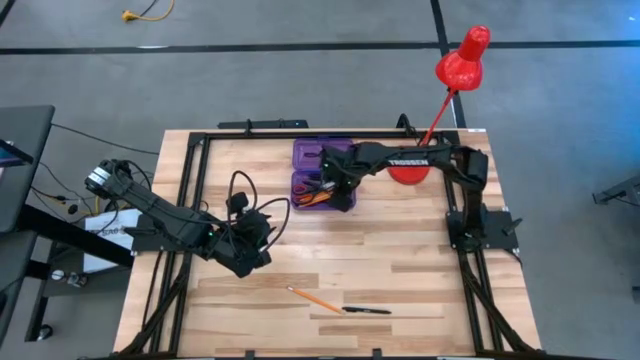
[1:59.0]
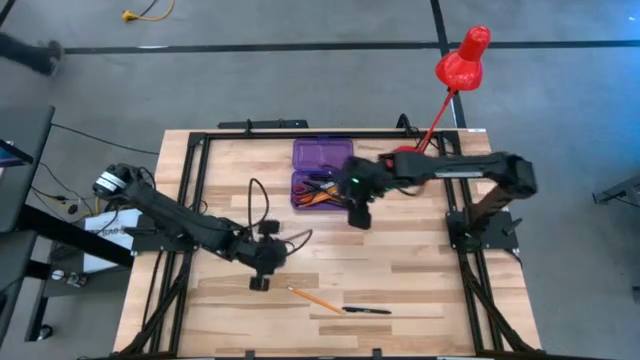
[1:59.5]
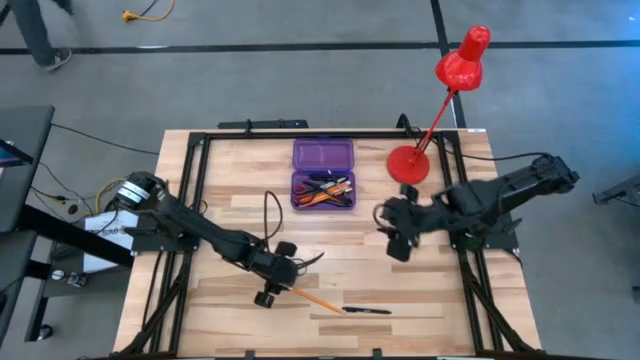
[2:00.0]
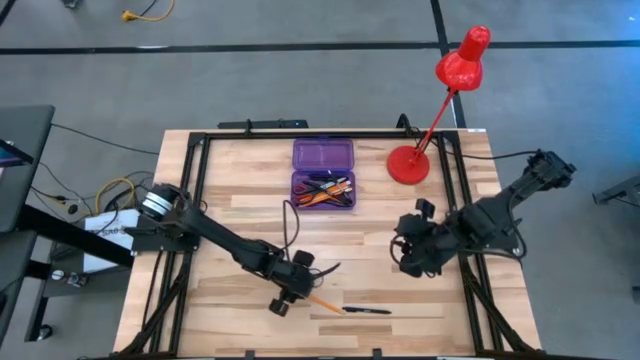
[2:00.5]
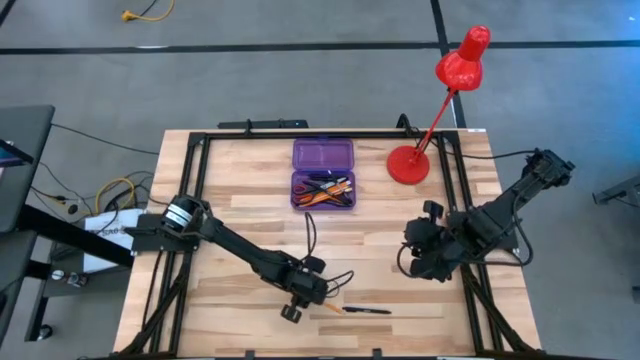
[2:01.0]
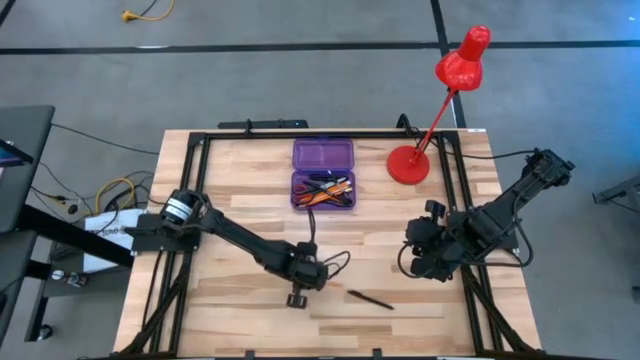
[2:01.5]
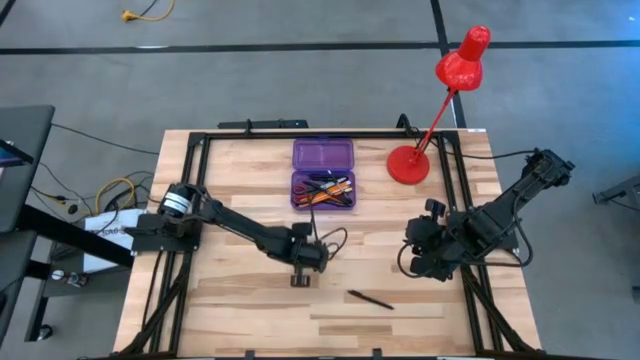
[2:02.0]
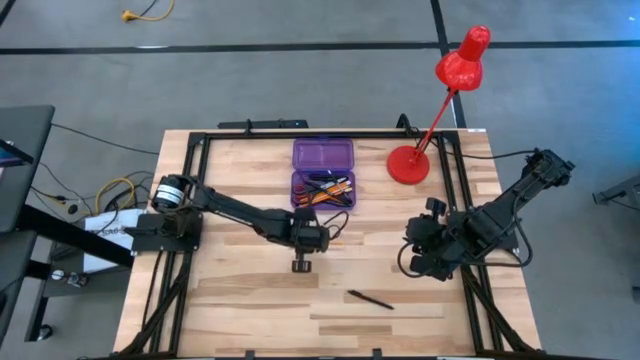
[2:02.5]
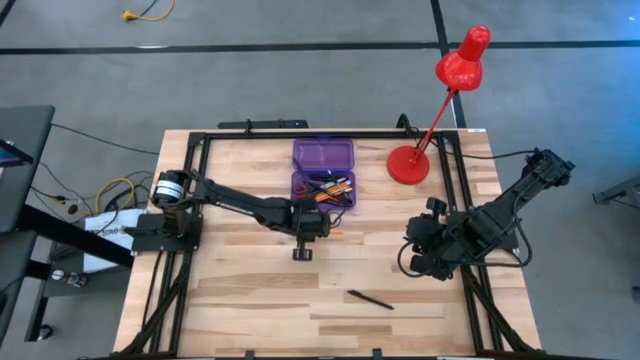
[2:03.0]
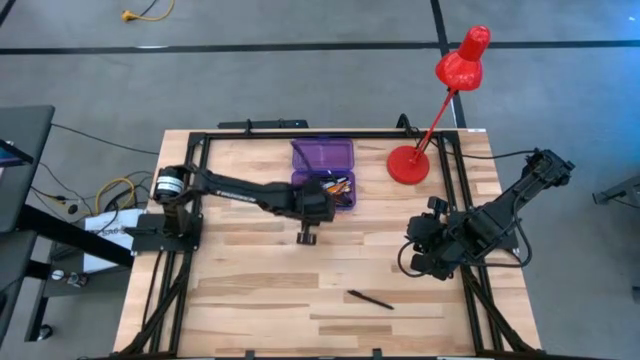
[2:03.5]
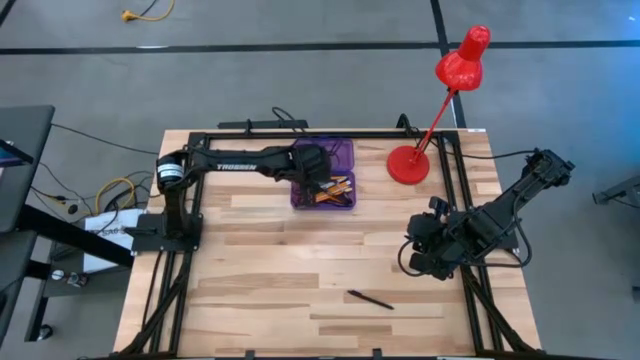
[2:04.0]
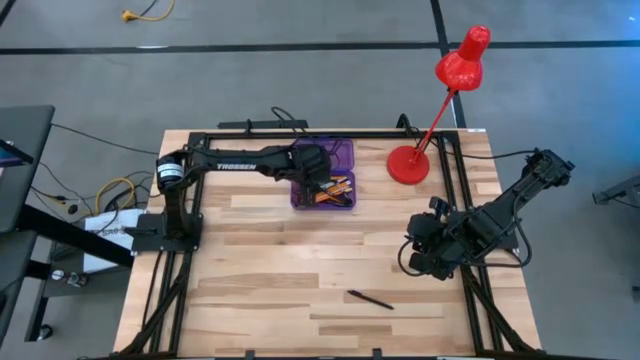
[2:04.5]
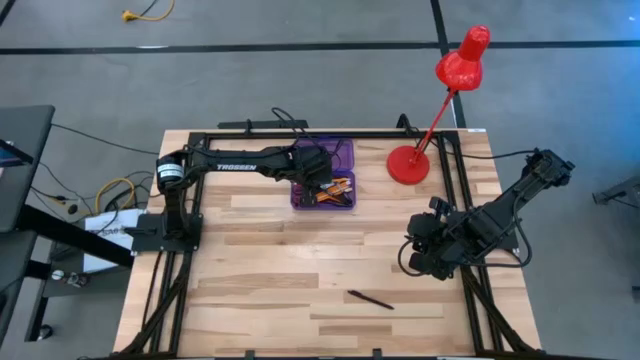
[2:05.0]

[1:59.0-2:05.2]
Task: Pick & place school supplies into a supply box
Put the yellow pencil into the purple supply box

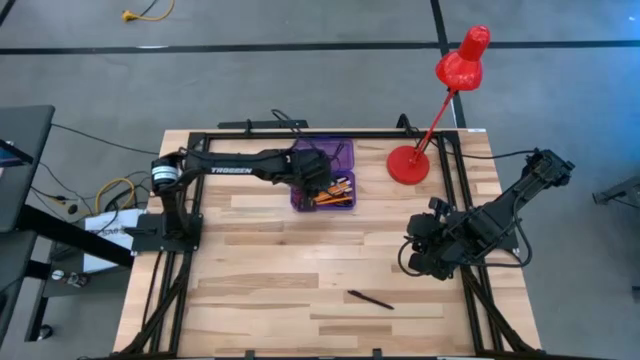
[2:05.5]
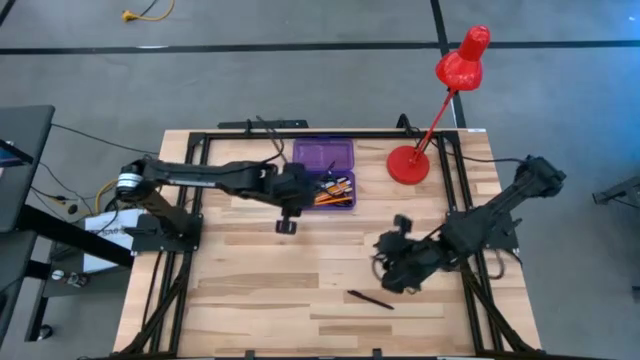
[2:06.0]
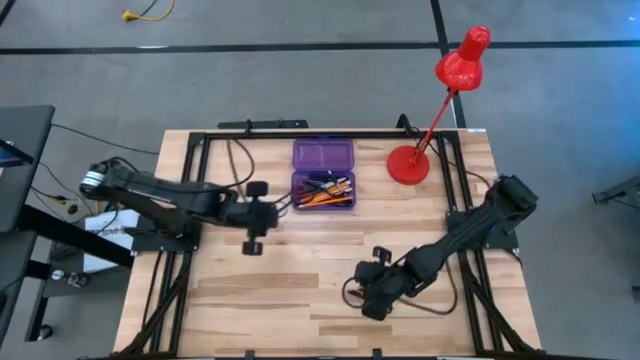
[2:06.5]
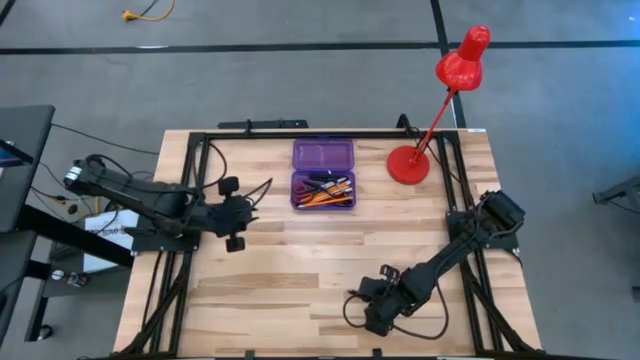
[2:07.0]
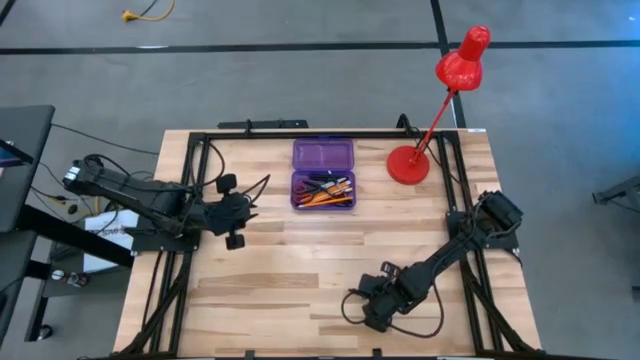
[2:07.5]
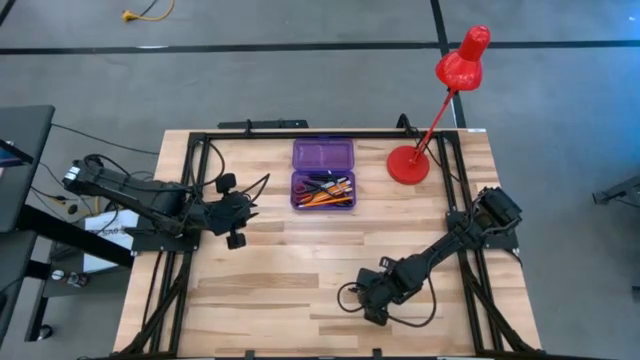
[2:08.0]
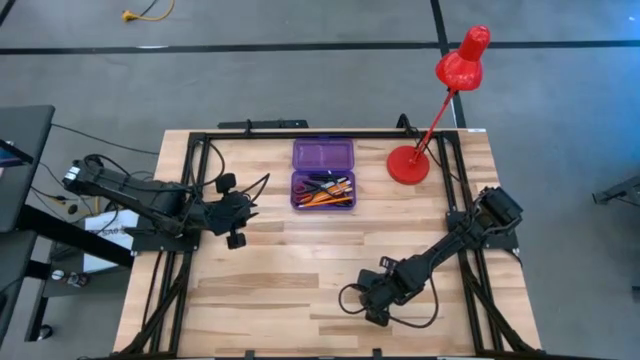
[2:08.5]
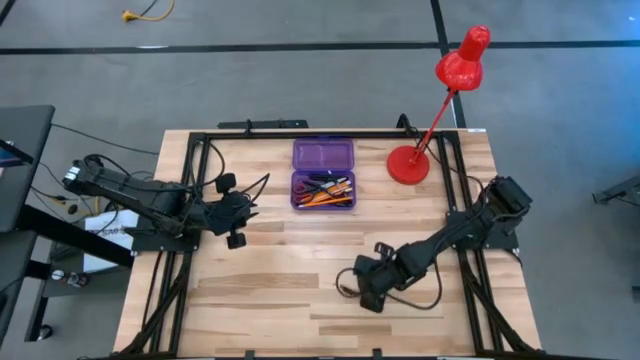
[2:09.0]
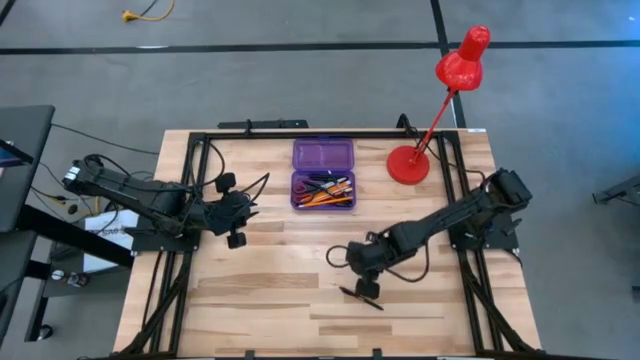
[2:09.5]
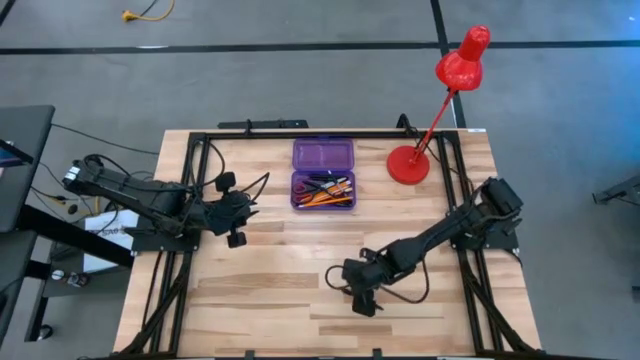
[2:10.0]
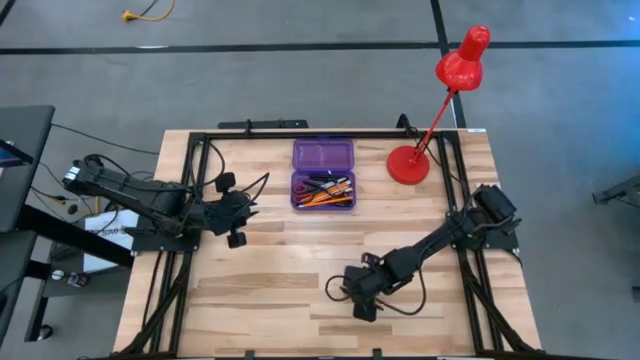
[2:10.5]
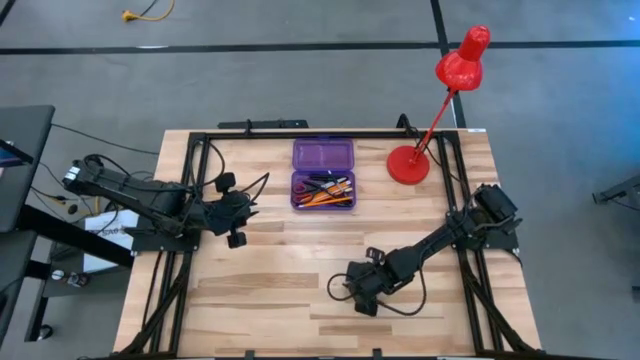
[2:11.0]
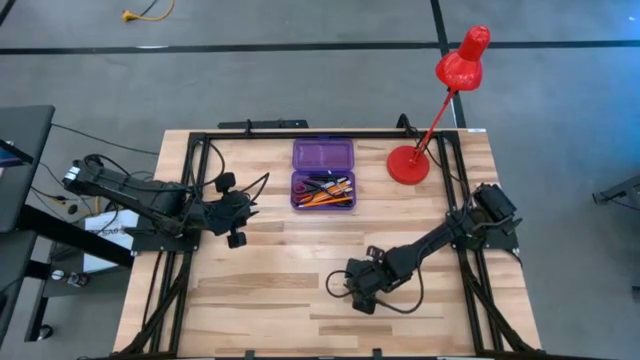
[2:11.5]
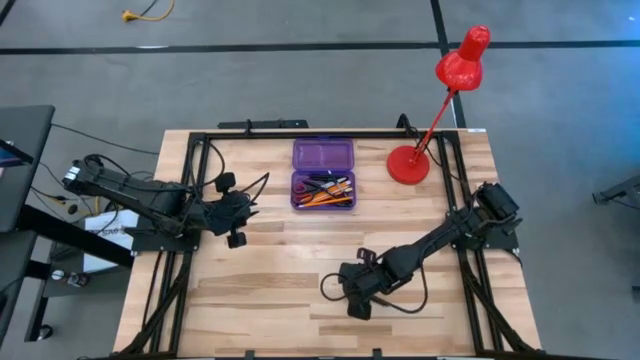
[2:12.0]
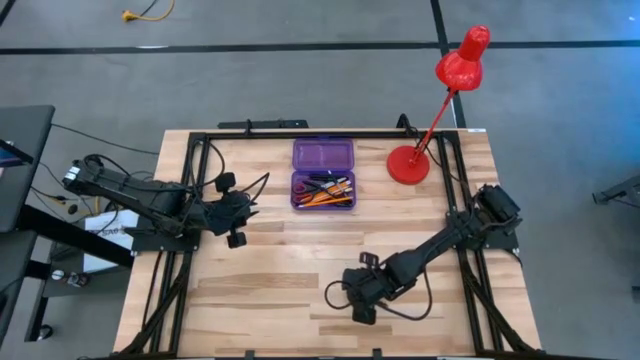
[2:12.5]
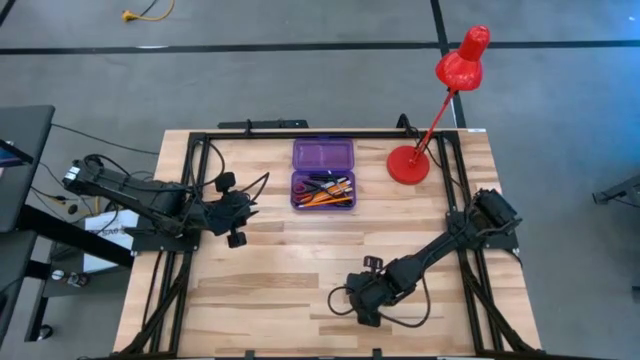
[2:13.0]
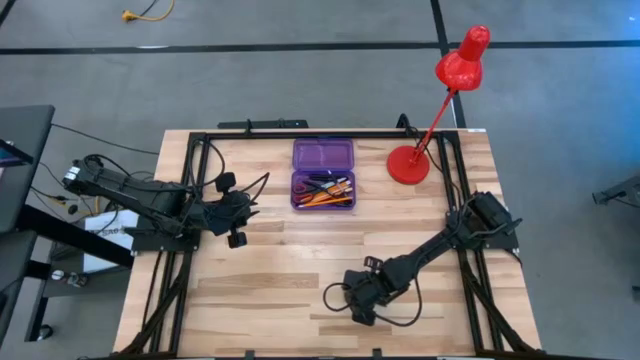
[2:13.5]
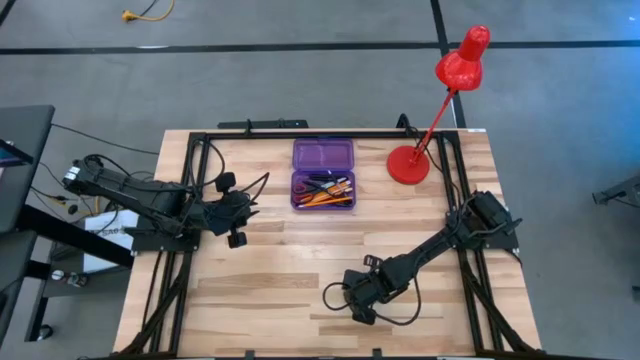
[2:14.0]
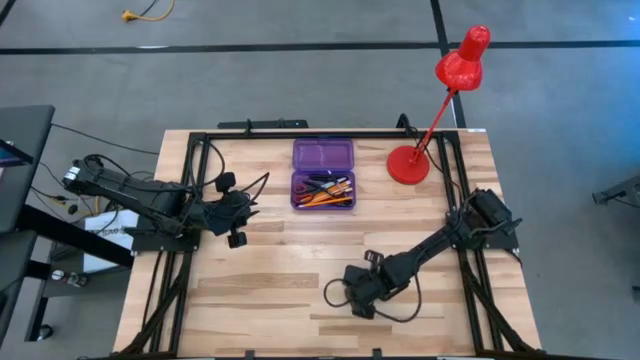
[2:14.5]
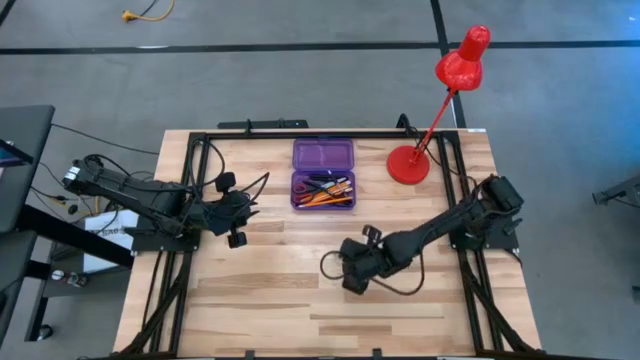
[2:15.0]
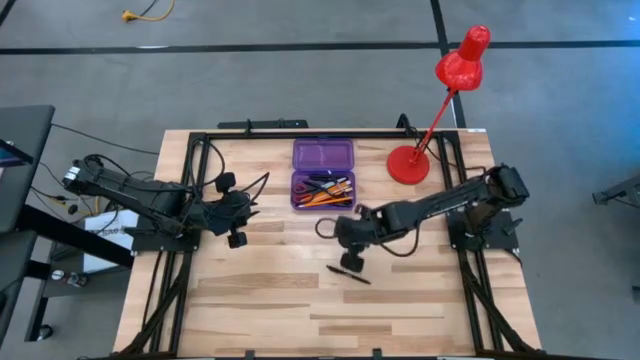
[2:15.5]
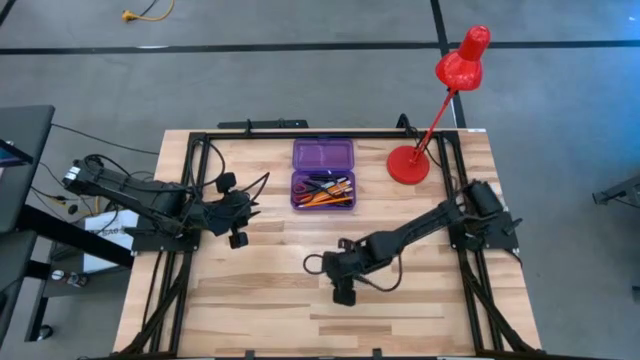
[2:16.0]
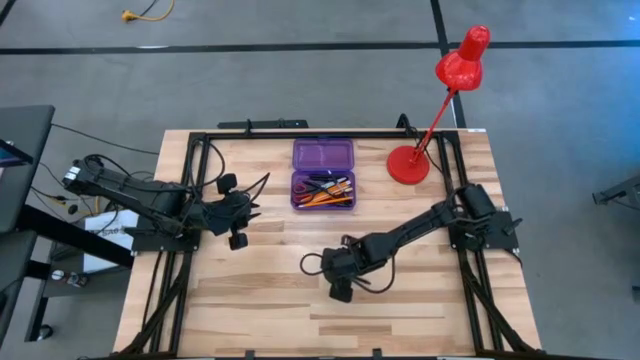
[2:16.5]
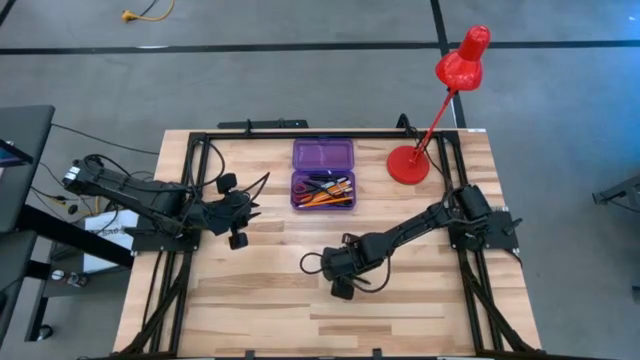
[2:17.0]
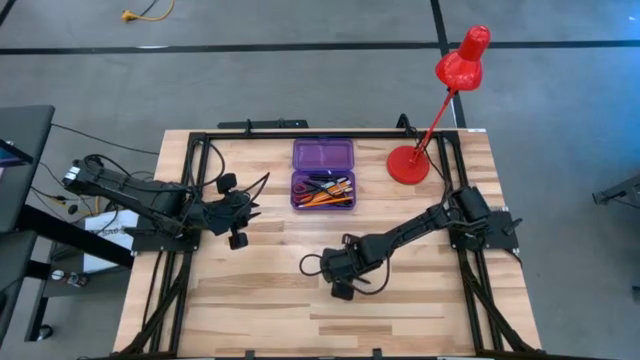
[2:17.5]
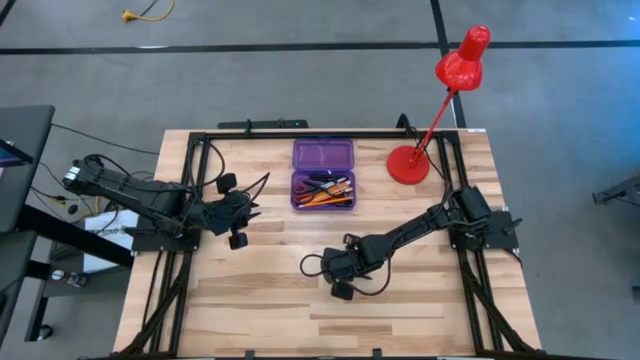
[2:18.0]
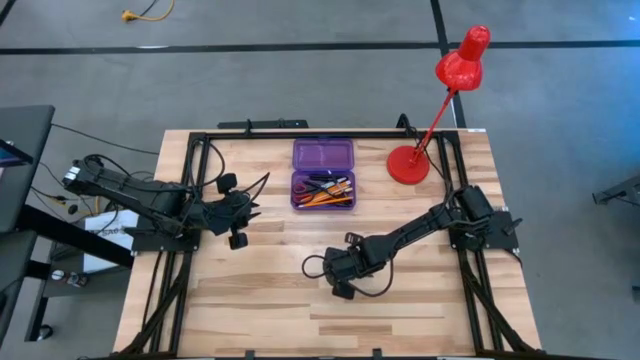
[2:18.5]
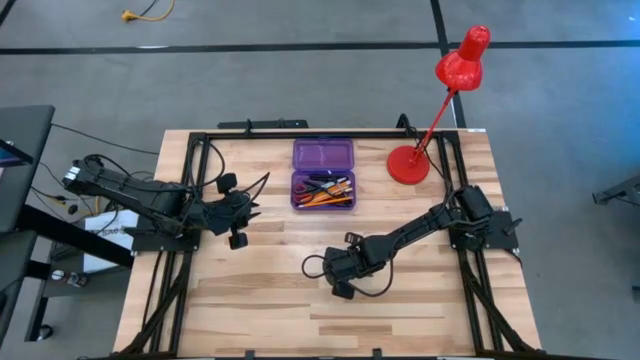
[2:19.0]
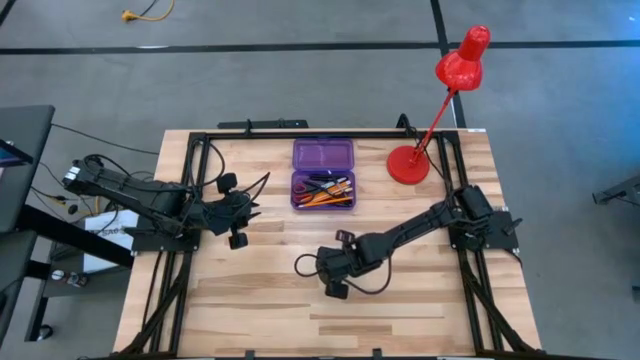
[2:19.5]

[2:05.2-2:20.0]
Put the black pen into the purple supply box
